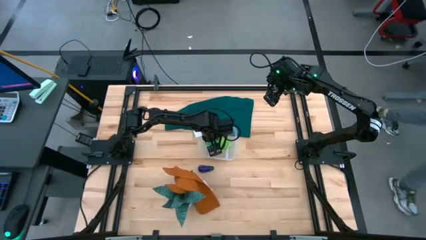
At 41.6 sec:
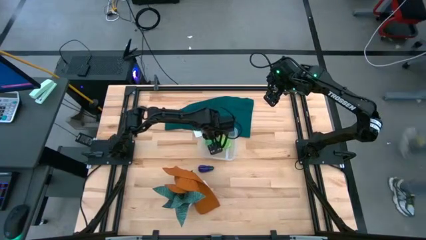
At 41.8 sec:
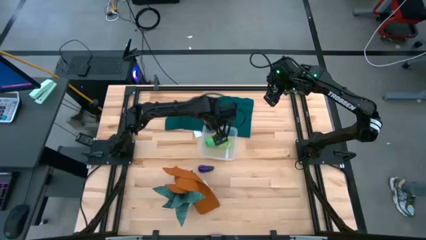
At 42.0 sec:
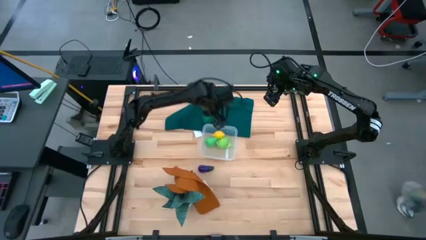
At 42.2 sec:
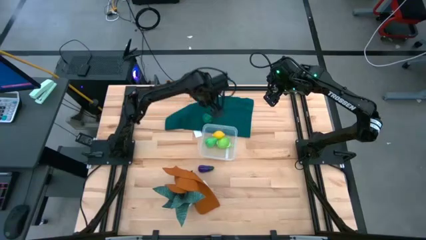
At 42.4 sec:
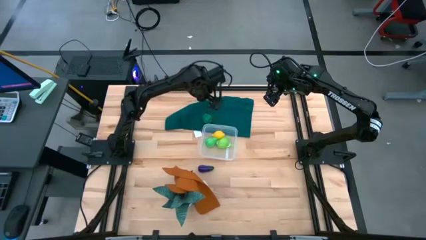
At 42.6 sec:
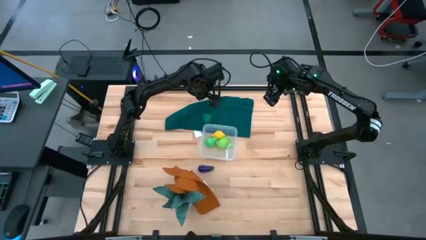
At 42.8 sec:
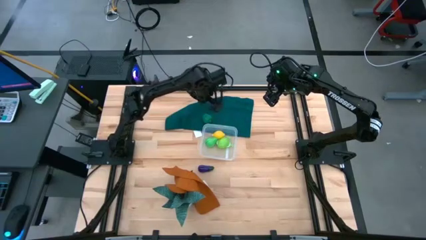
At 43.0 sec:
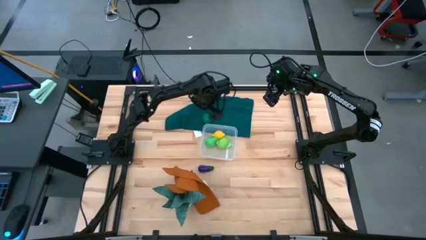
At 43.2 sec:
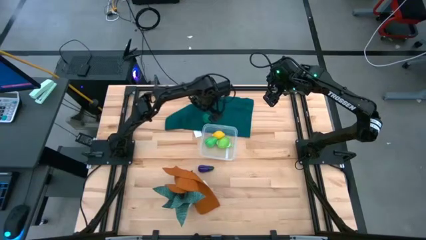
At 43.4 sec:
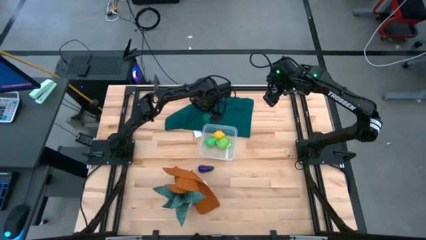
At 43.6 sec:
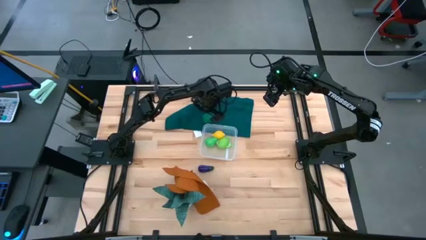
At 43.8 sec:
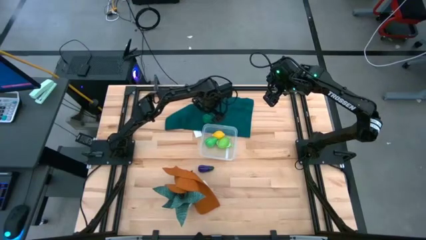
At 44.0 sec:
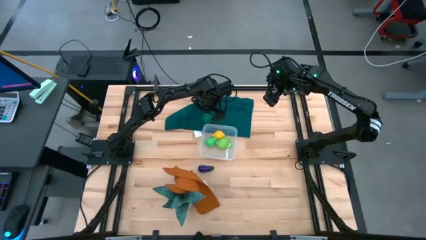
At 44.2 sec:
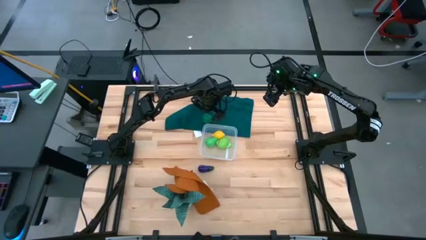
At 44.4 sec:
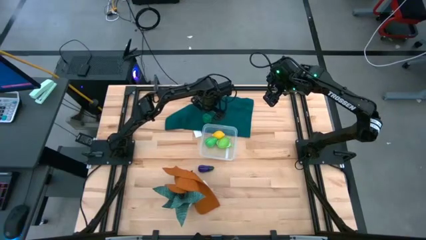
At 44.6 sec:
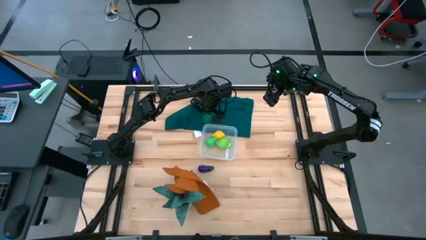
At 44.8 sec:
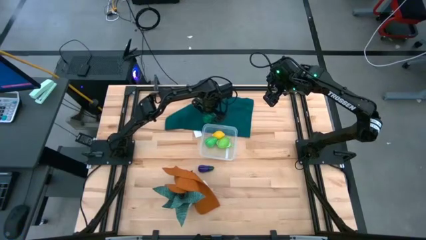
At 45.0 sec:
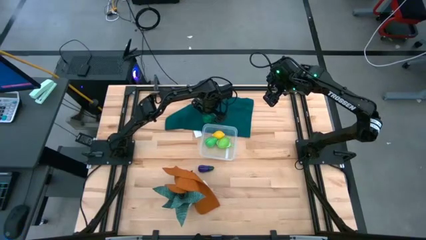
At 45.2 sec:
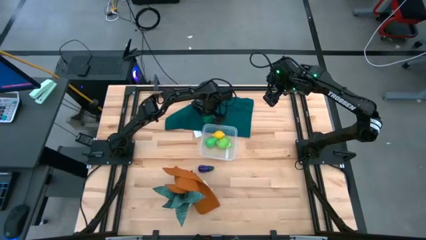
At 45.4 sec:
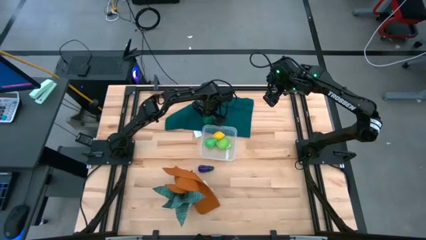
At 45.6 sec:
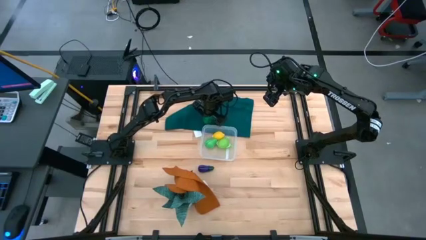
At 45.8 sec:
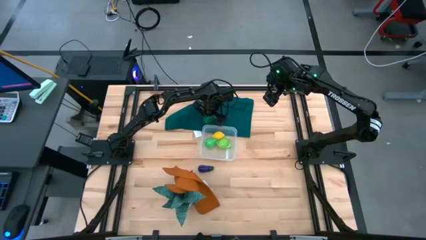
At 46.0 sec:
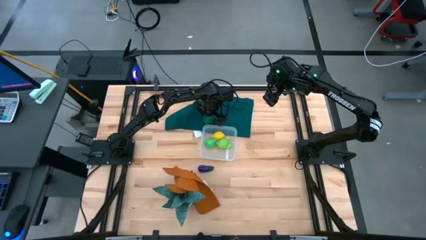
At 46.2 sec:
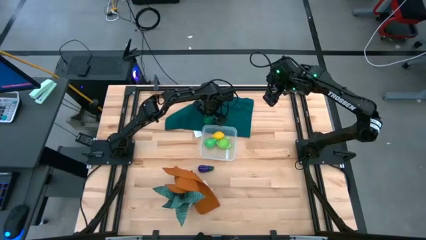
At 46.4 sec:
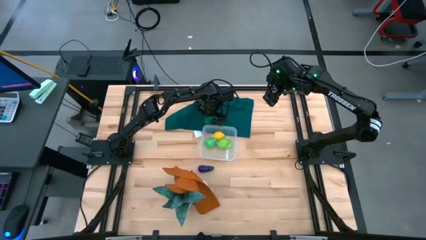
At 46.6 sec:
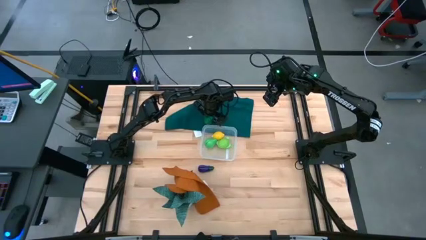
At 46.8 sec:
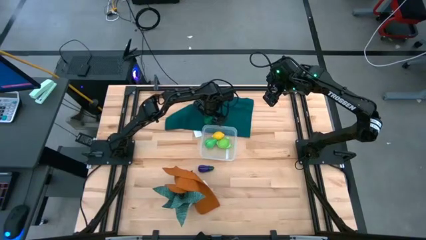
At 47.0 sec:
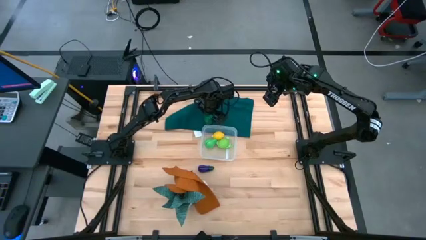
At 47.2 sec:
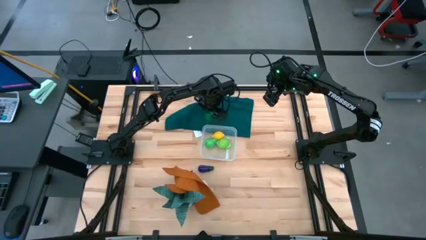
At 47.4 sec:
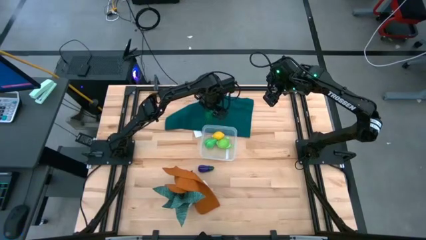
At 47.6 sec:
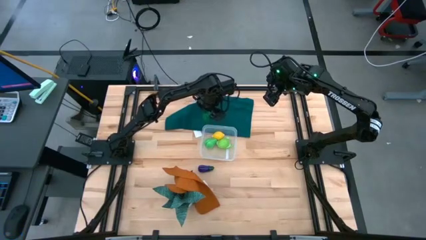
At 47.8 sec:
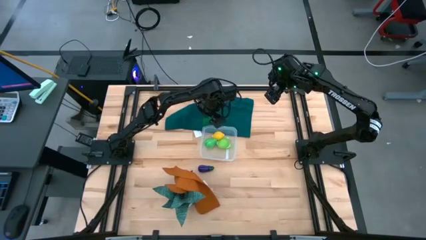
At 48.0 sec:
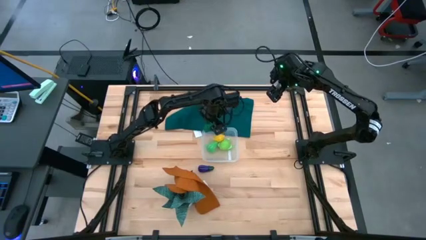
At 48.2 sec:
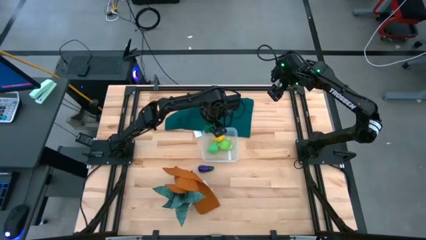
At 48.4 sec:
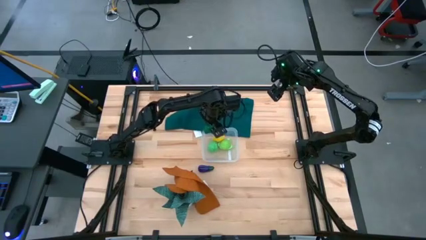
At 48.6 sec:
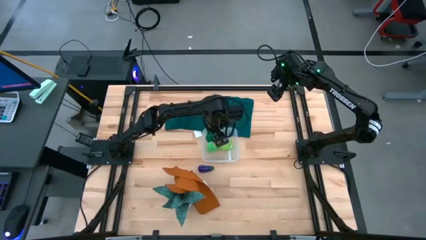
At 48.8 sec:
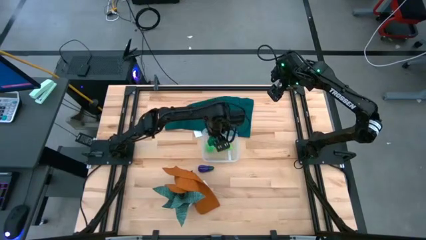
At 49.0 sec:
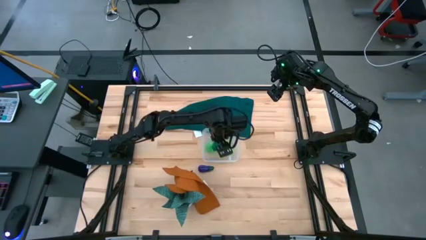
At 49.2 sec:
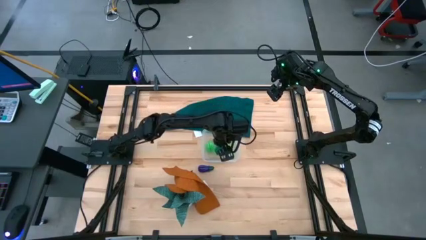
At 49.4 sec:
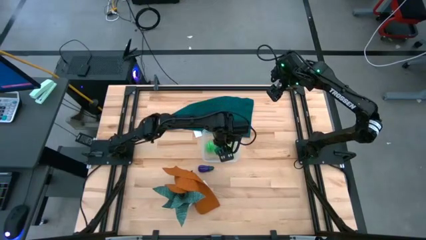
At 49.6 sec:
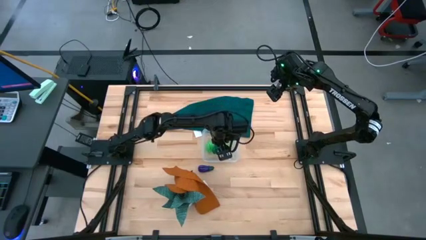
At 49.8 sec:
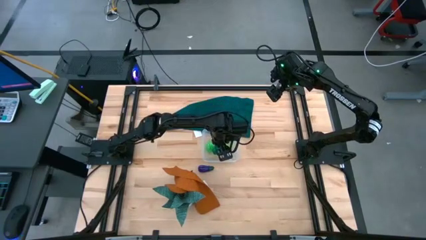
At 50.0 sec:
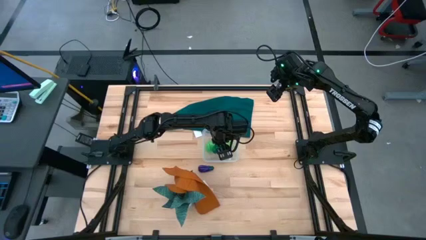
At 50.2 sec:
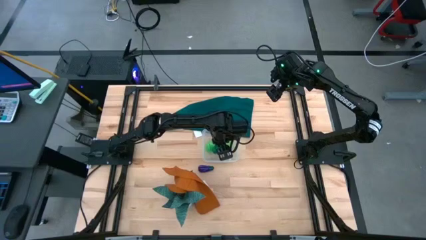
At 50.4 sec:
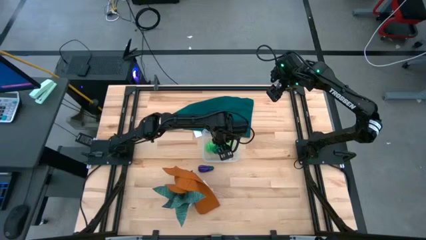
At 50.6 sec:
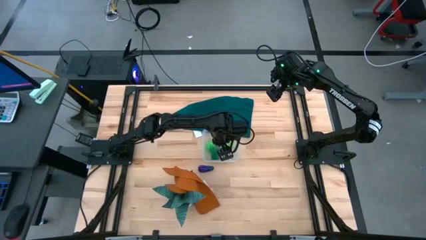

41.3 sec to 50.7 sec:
Task: Pick and placing Produce into tupperware
Put the bell pepper into the bin

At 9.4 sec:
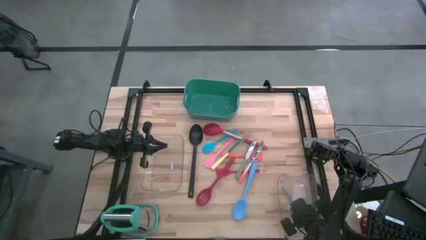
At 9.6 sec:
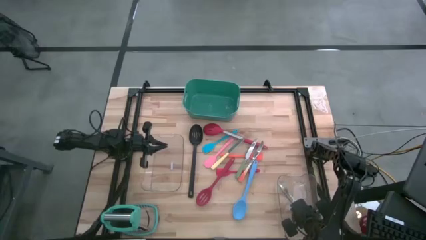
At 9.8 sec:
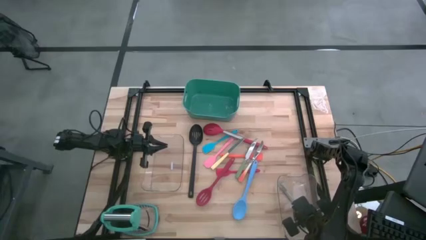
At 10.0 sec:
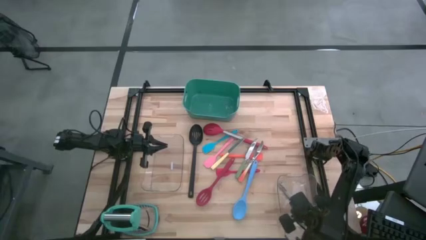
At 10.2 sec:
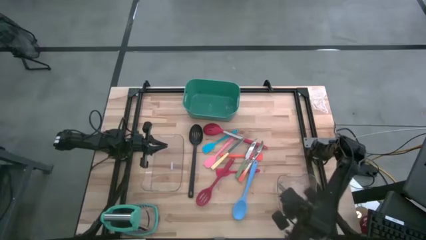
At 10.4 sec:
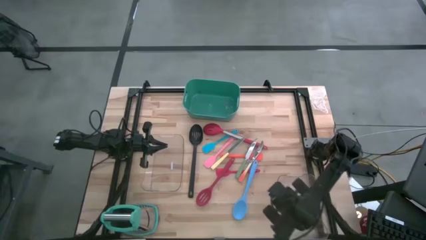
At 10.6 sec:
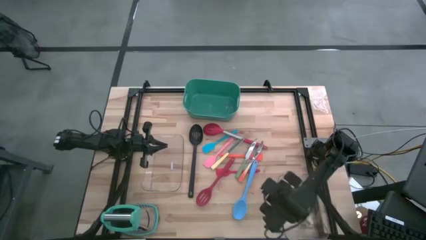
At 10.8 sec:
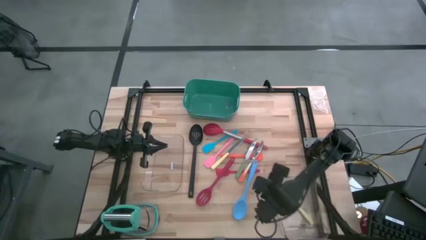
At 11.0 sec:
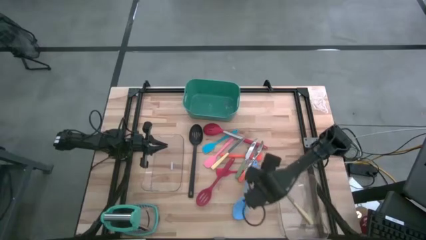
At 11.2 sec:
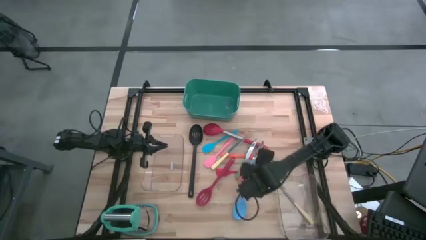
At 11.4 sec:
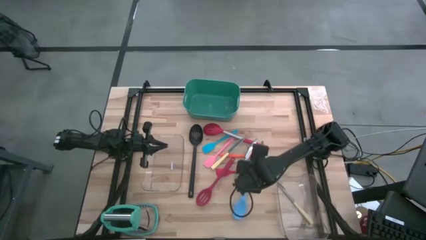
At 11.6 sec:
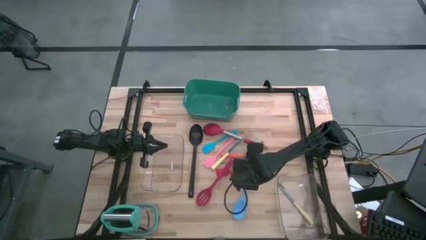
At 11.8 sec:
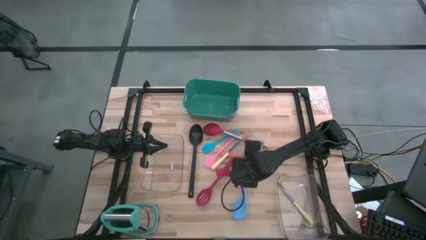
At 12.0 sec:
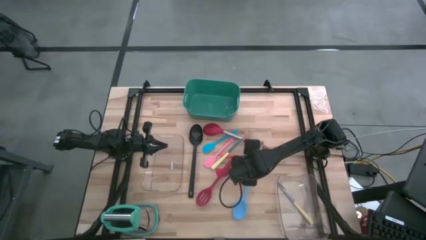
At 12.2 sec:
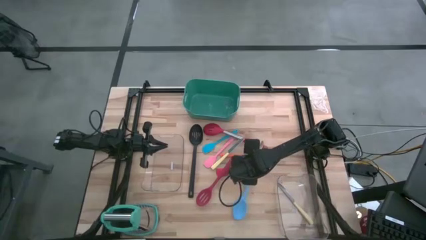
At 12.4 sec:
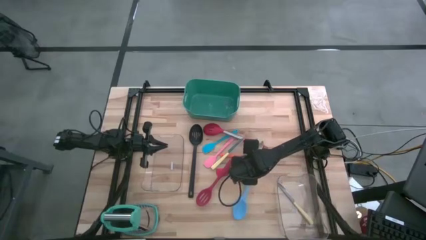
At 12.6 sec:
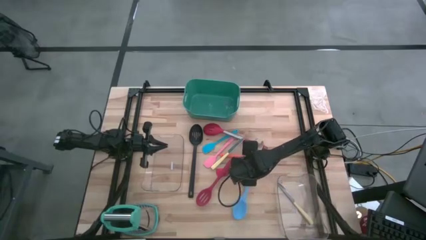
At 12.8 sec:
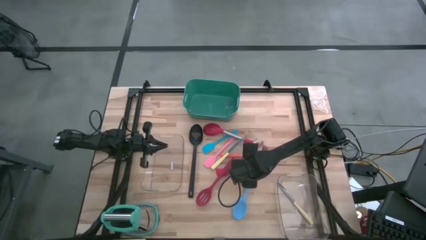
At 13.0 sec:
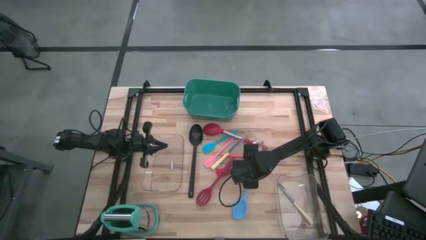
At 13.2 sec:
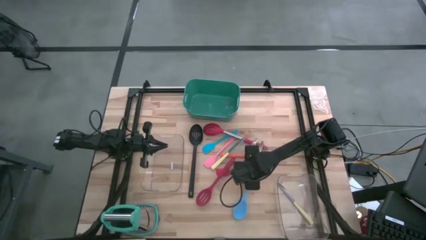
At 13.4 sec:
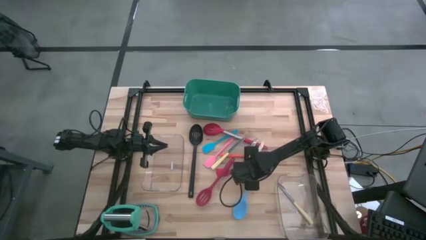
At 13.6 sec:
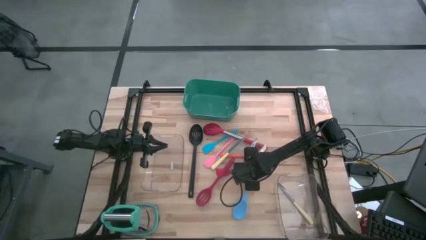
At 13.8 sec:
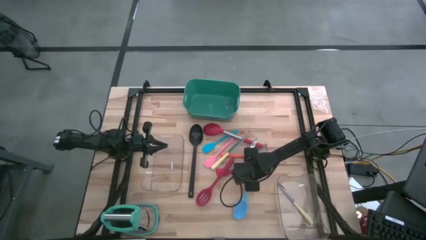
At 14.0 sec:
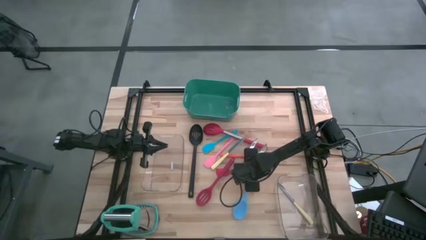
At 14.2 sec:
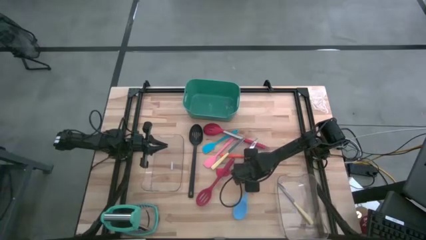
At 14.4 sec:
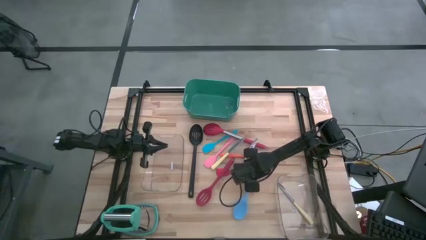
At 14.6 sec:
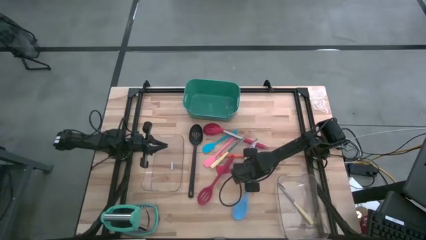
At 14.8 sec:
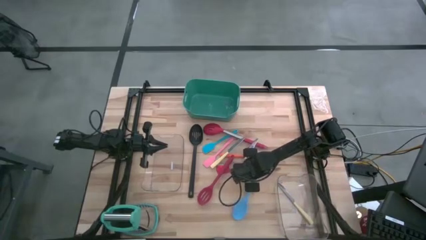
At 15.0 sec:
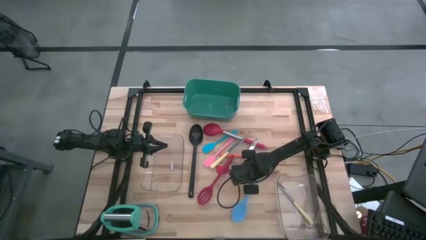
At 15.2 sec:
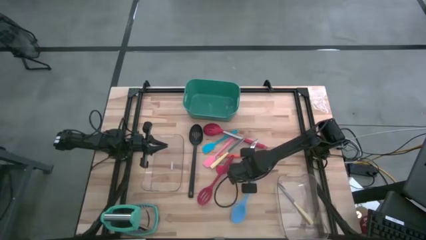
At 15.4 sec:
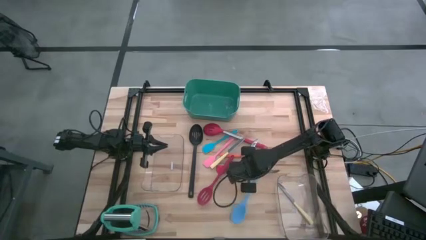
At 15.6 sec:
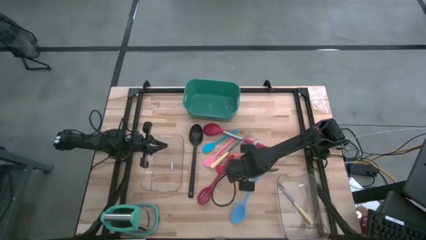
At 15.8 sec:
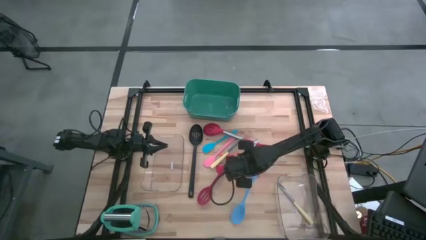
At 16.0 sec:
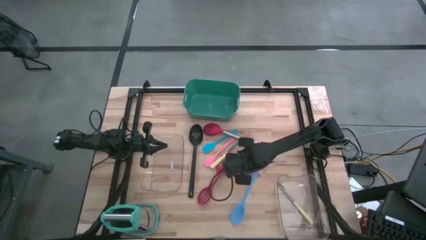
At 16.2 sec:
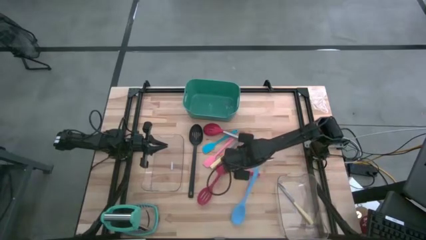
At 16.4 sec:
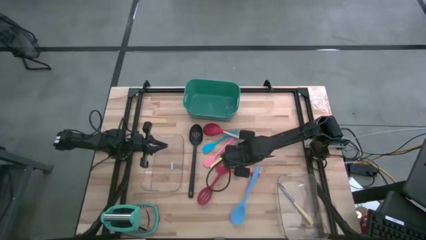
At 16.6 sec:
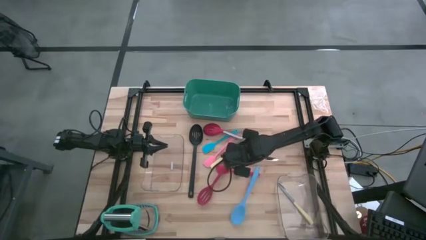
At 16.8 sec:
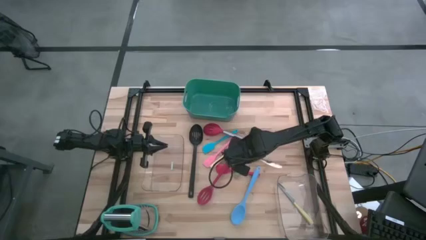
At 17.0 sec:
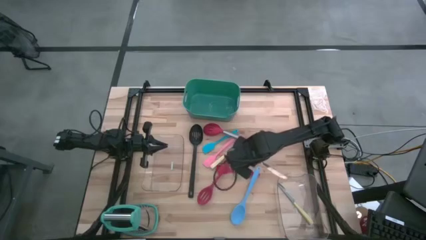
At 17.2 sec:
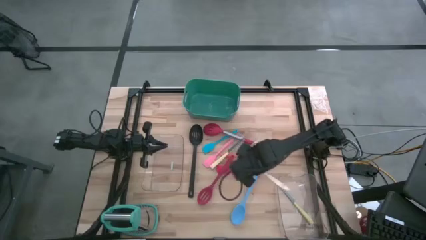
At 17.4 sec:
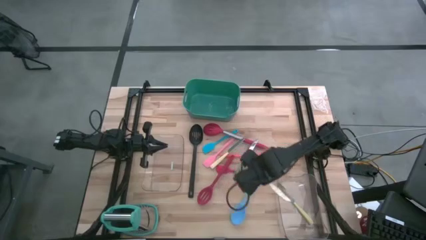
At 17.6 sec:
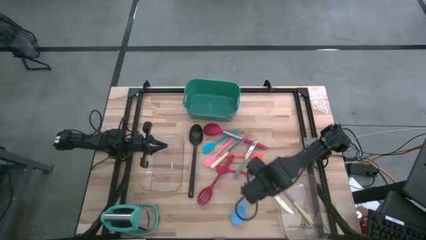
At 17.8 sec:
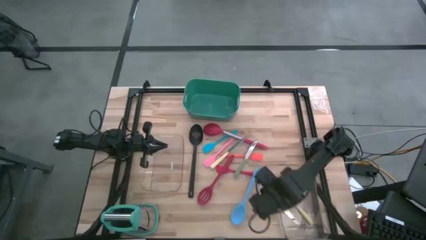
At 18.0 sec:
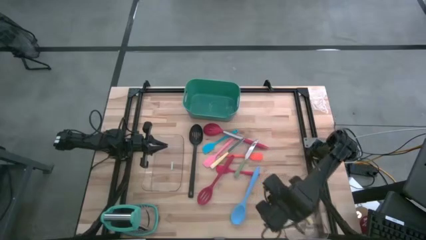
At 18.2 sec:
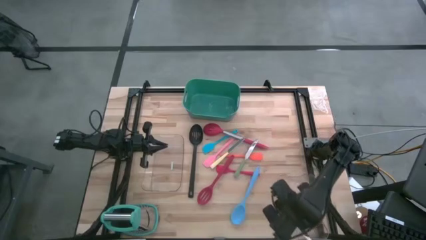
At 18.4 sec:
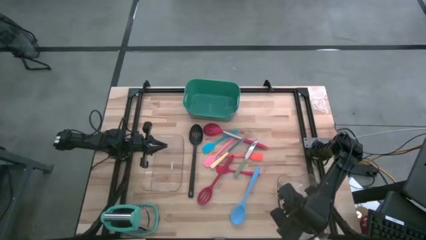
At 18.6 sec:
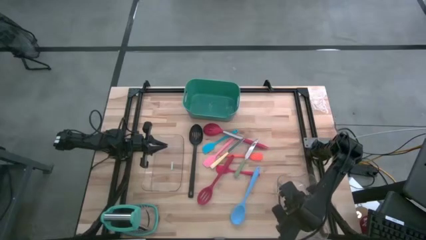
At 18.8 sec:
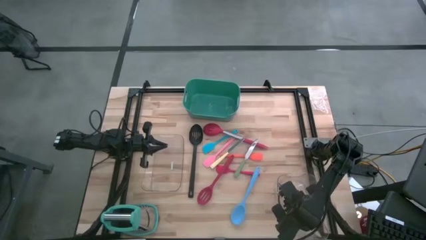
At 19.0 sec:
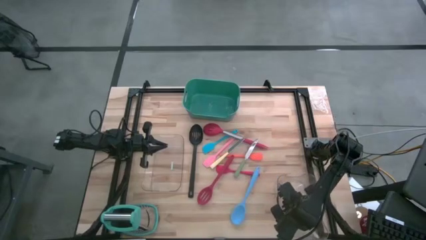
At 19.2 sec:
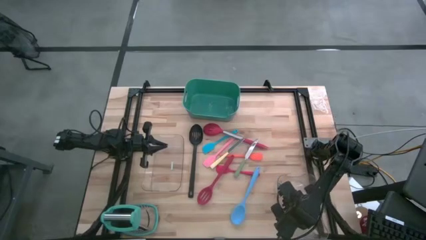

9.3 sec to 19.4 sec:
Task: Pick & Place Kitchen Items
Put the orange knife into the right transparent bin
